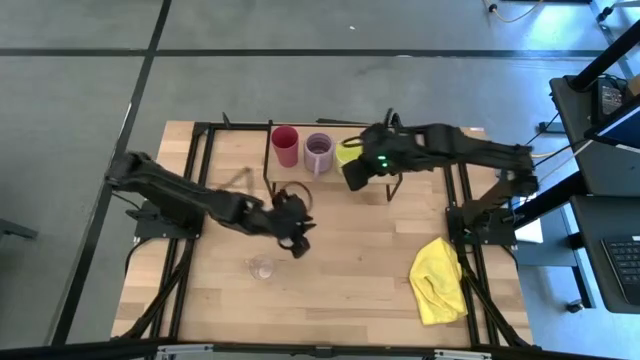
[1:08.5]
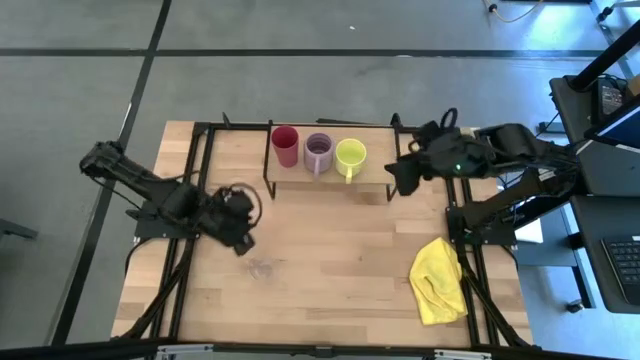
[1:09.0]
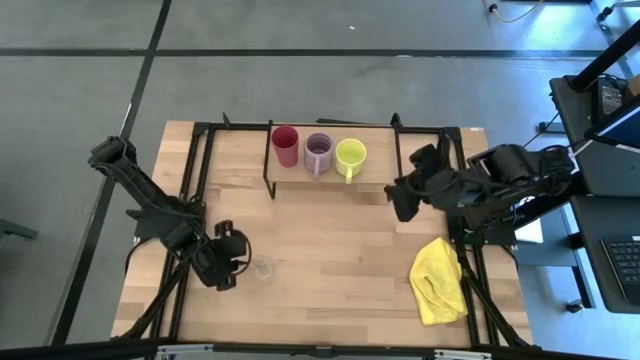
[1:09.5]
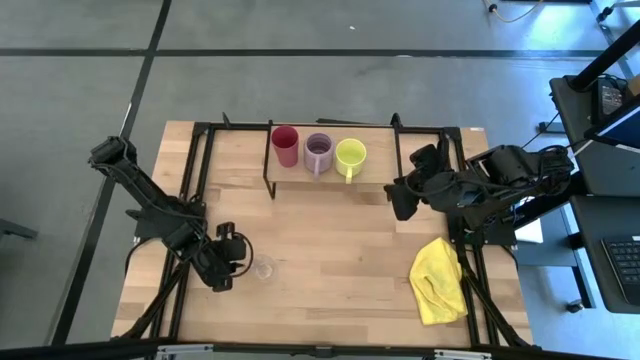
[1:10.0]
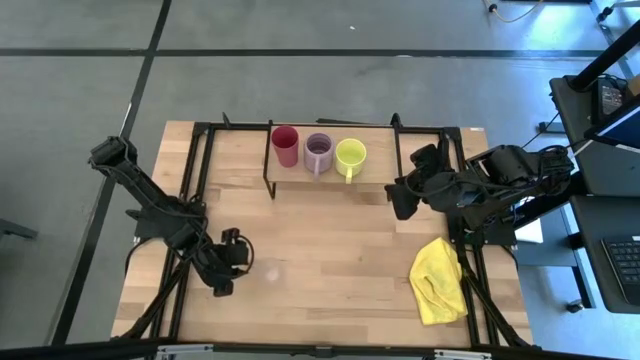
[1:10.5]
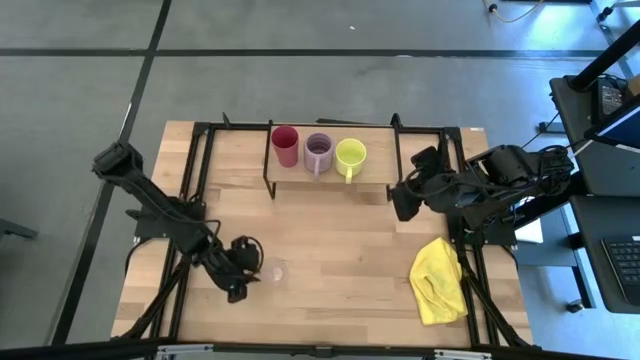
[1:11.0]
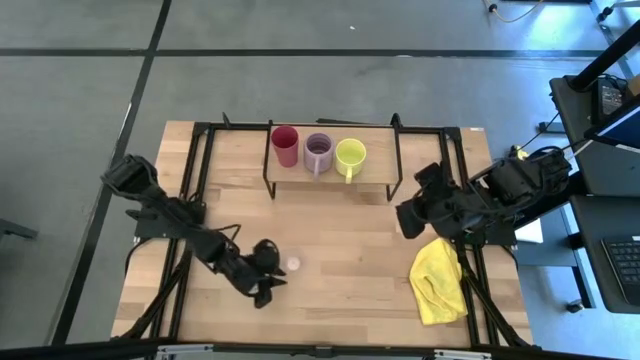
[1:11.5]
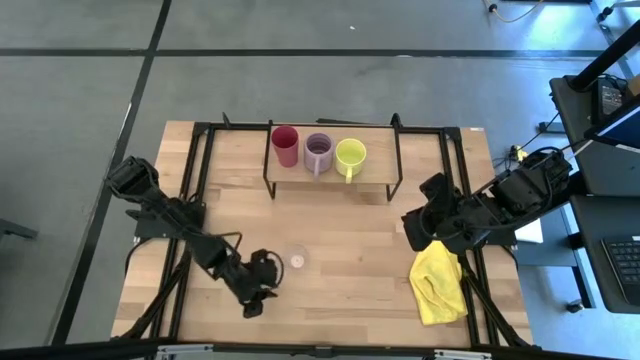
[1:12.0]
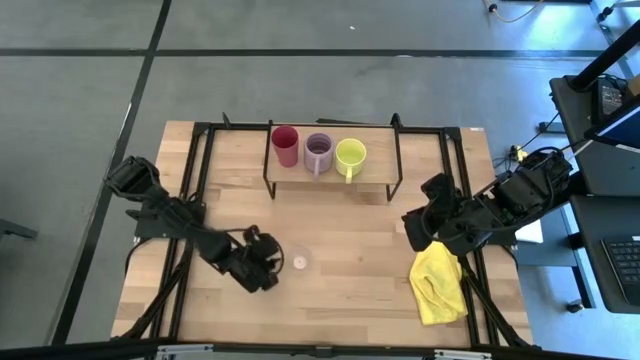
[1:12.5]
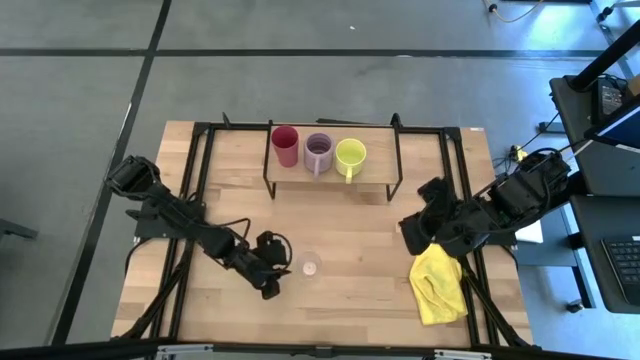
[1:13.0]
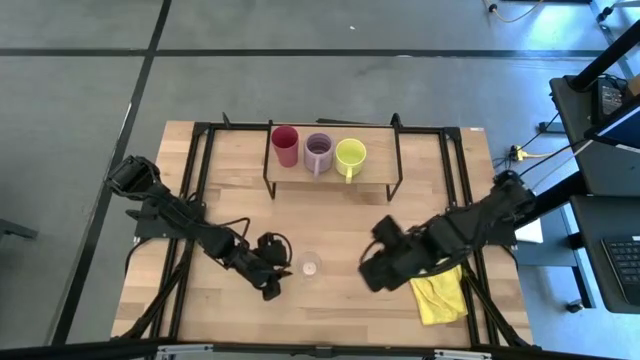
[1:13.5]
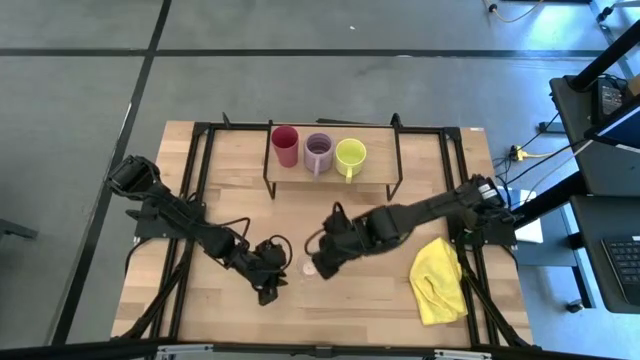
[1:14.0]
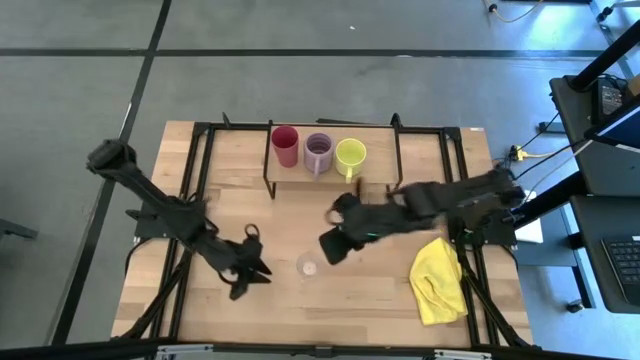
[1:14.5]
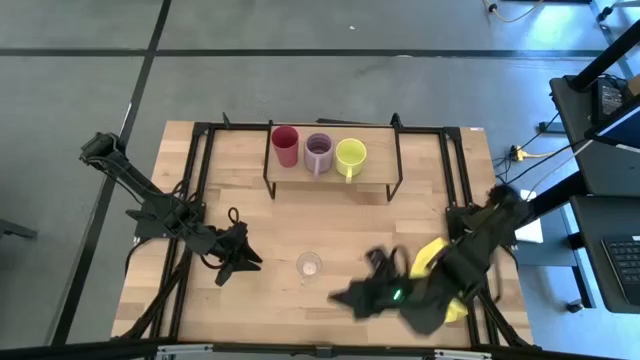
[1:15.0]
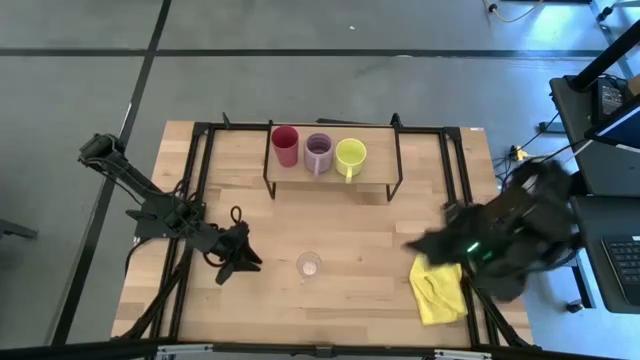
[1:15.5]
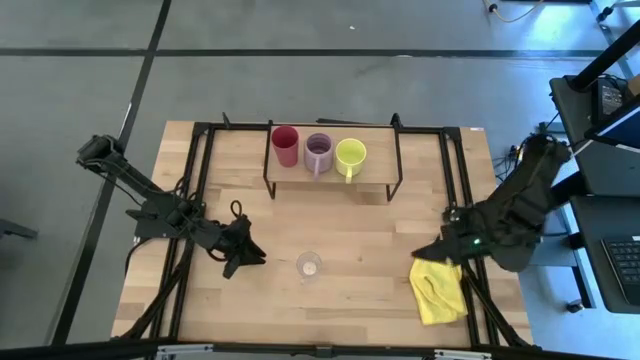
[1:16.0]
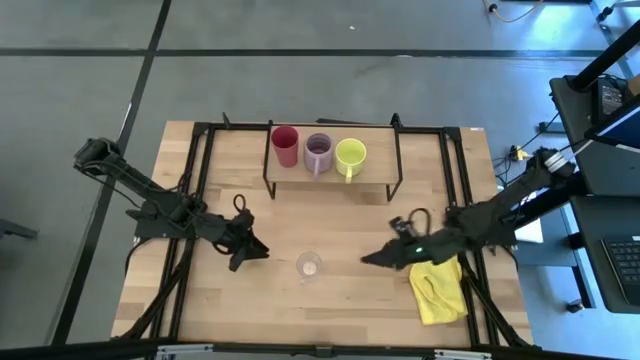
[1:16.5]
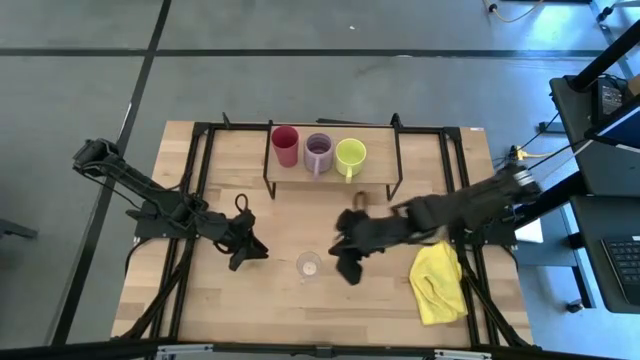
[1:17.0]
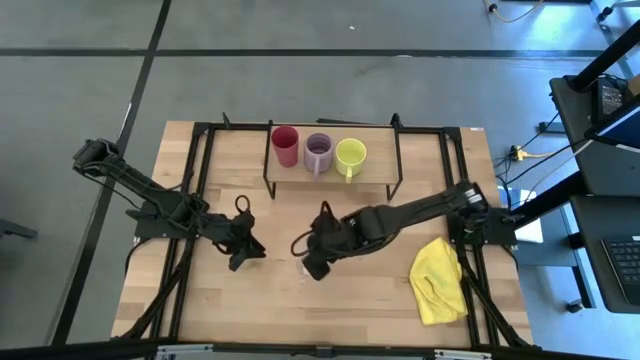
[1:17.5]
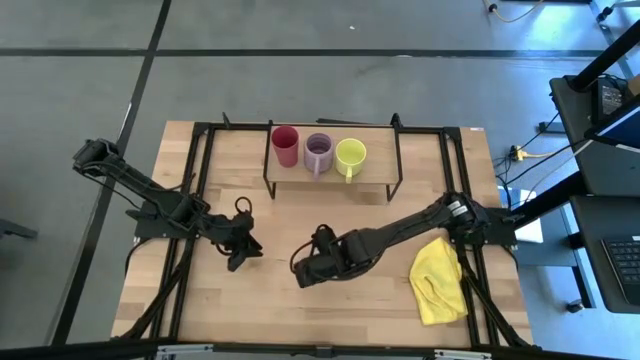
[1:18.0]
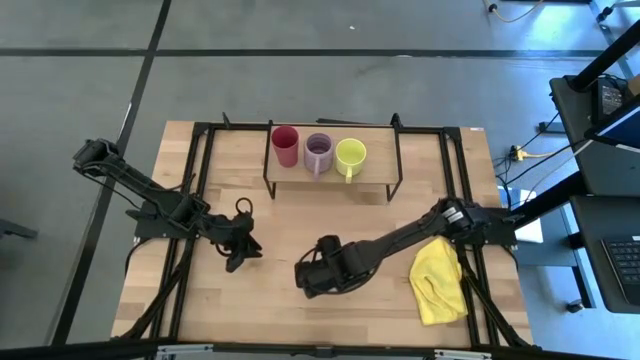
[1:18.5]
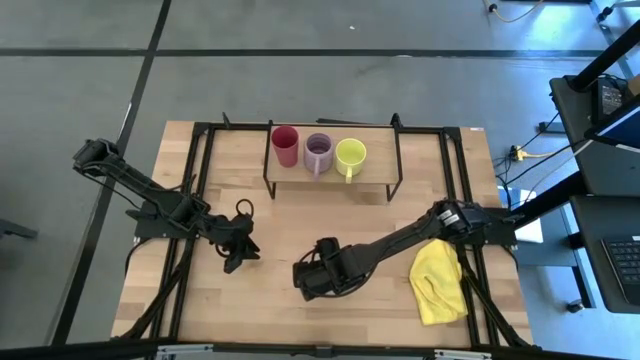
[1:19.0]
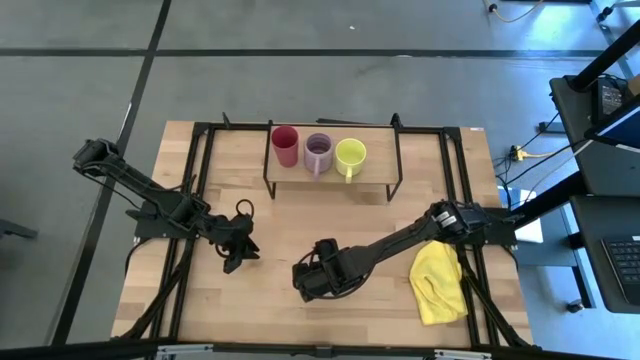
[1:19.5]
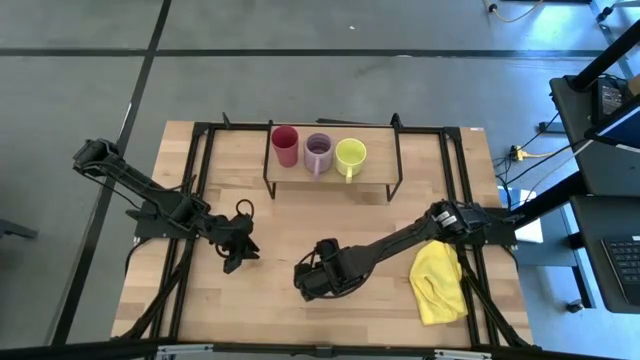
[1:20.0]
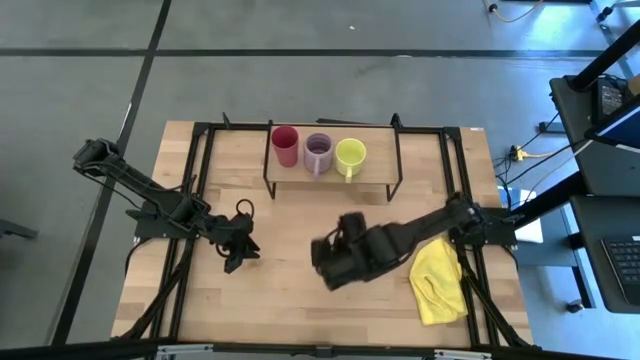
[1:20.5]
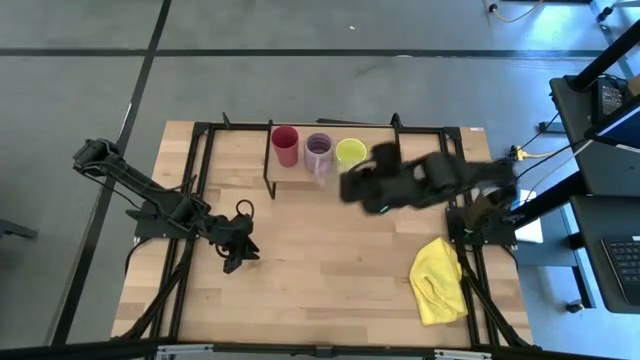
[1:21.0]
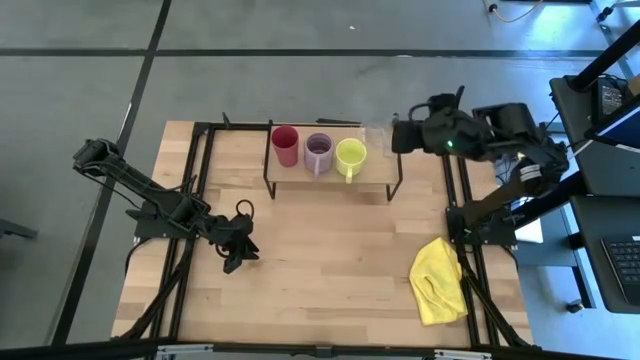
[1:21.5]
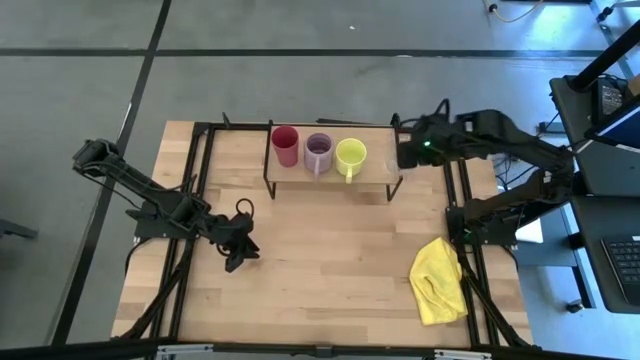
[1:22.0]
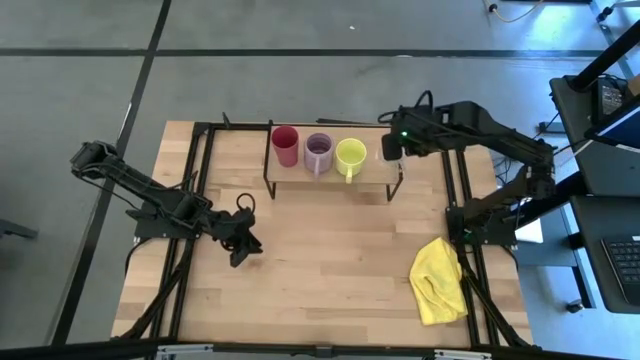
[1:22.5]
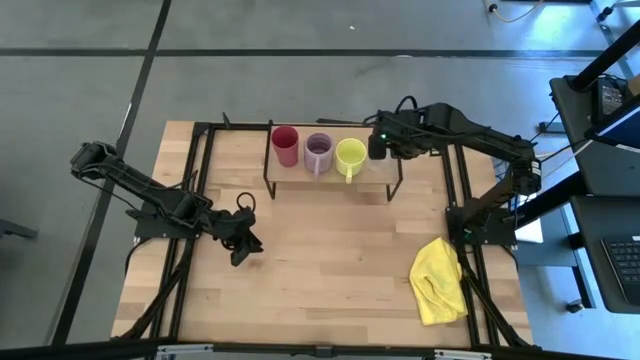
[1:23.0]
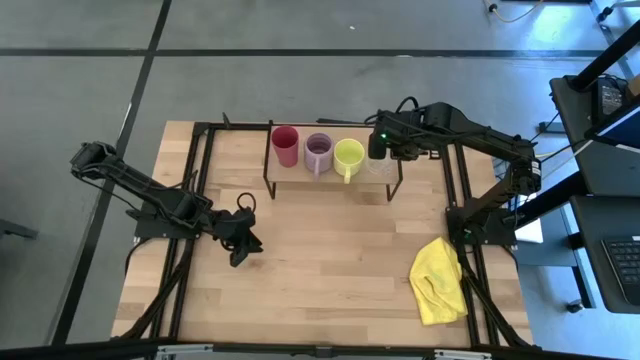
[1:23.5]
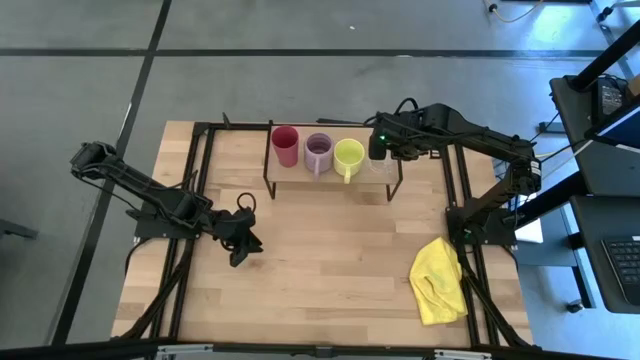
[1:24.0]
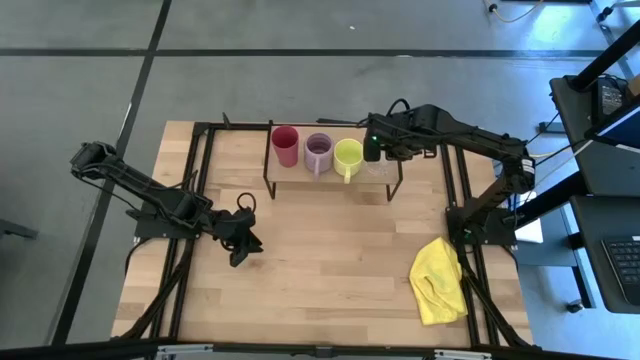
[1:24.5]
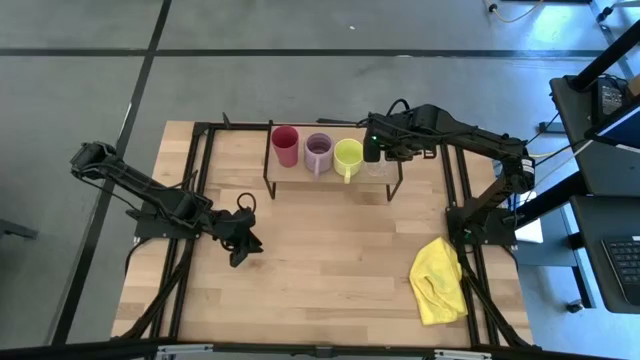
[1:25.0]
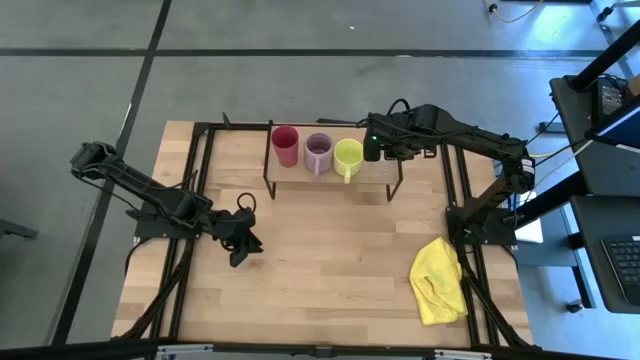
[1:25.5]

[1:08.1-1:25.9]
Task: Stack small to large cups/mugs on shelf
Put the transparent mug on the shelf

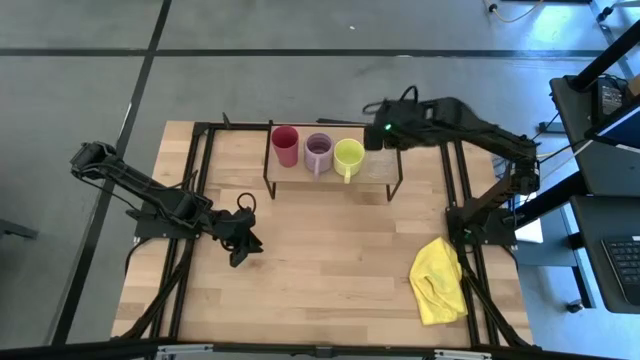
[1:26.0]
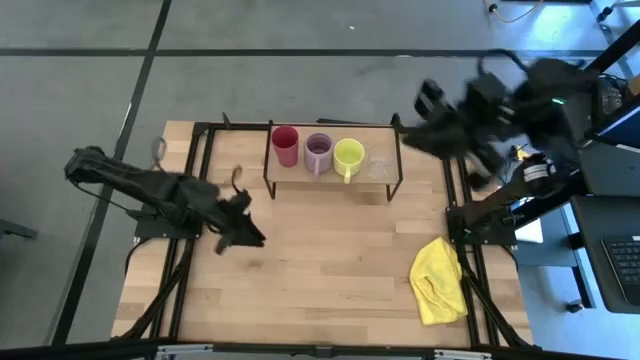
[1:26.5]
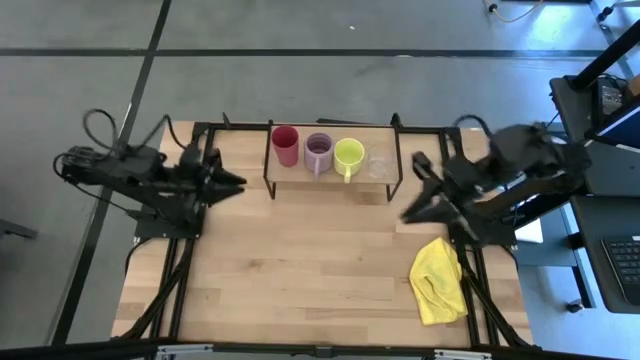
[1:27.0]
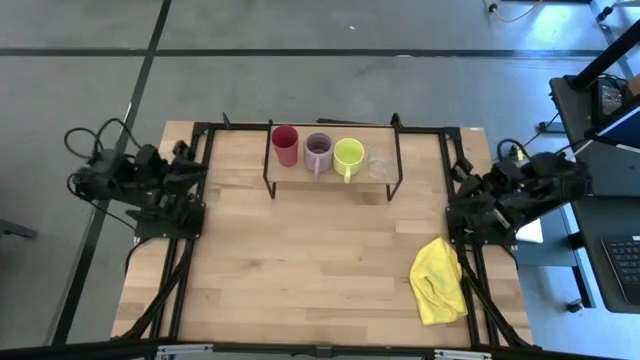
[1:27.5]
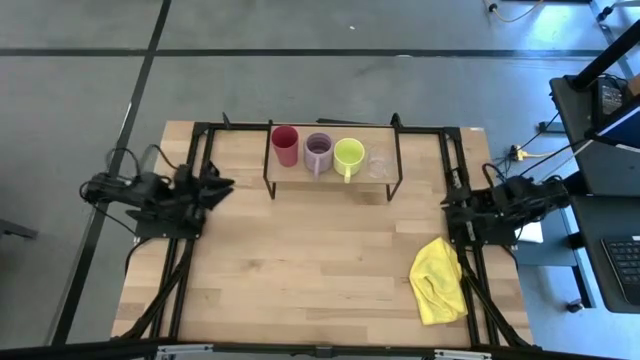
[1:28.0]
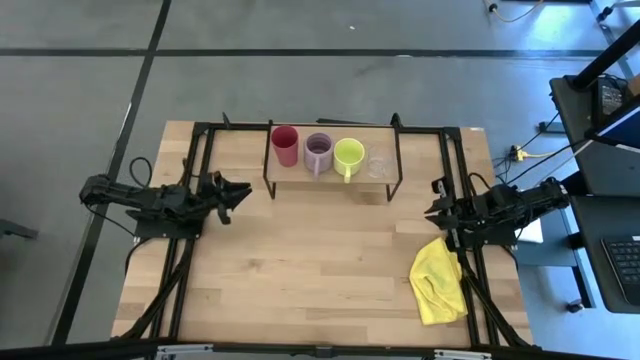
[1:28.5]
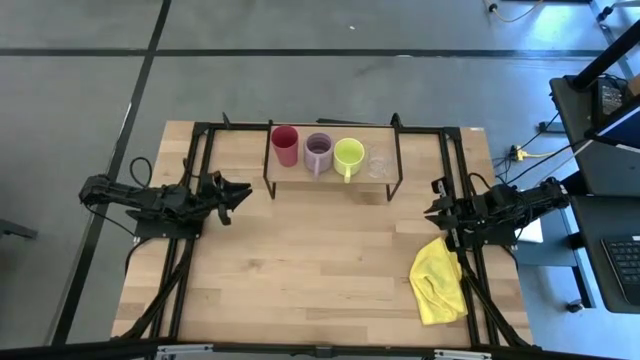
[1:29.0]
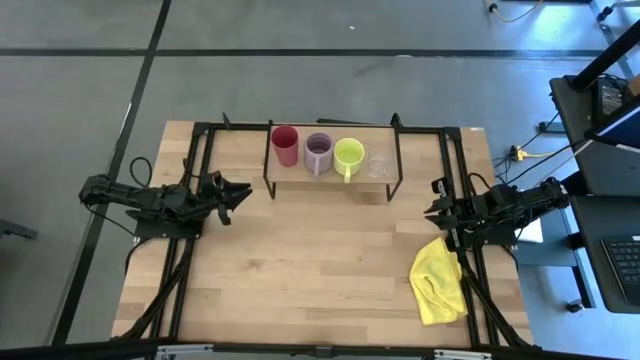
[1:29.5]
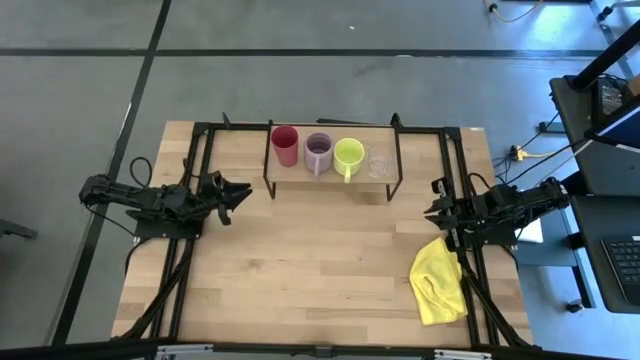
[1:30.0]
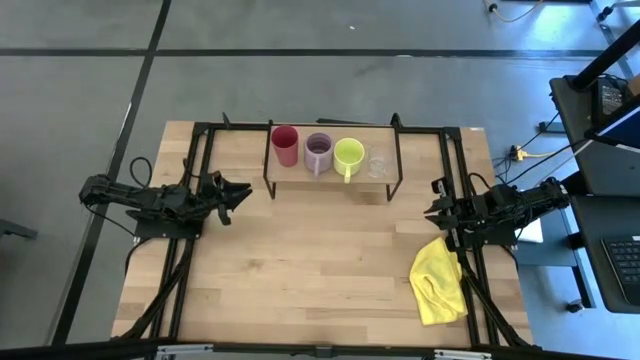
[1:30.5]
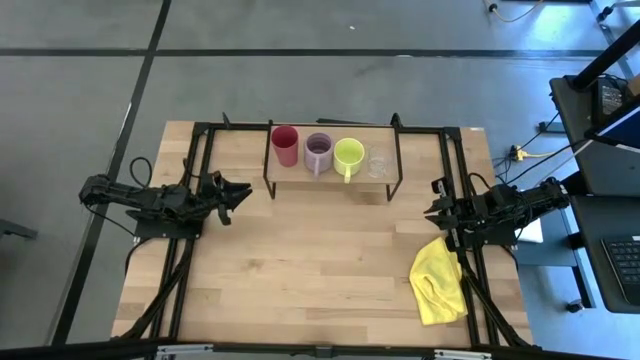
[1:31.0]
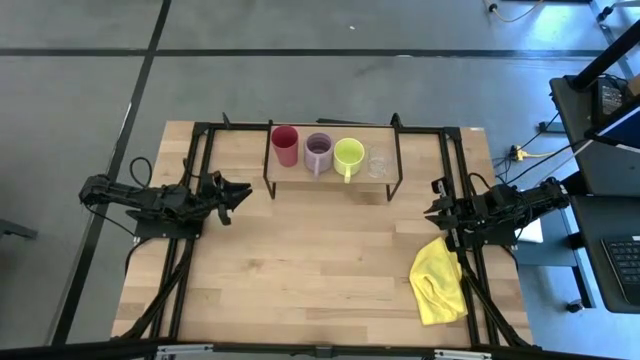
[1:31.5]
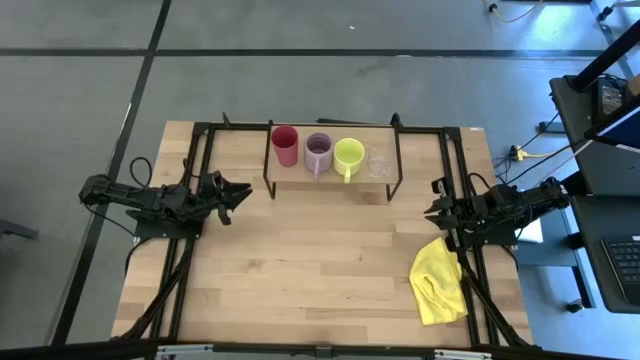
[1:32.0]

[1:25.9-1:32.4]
Return to Home Position
